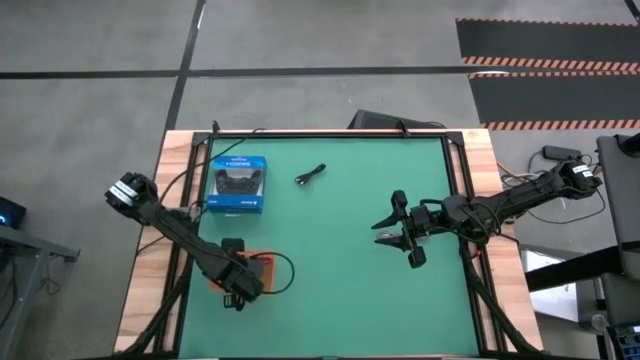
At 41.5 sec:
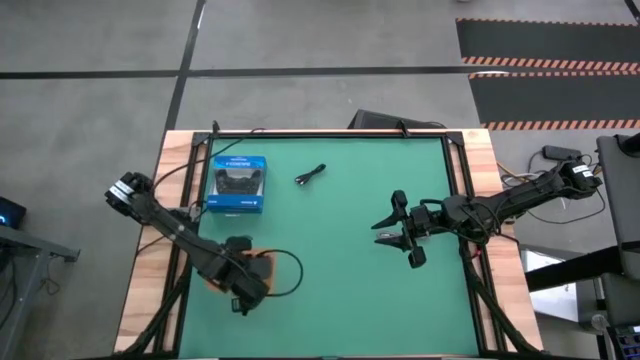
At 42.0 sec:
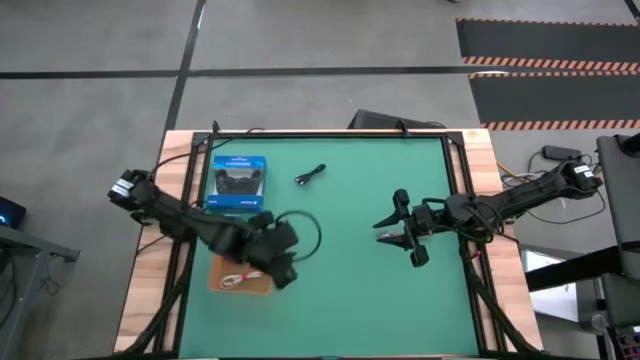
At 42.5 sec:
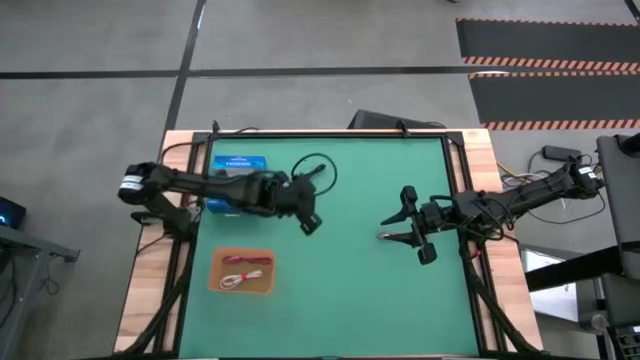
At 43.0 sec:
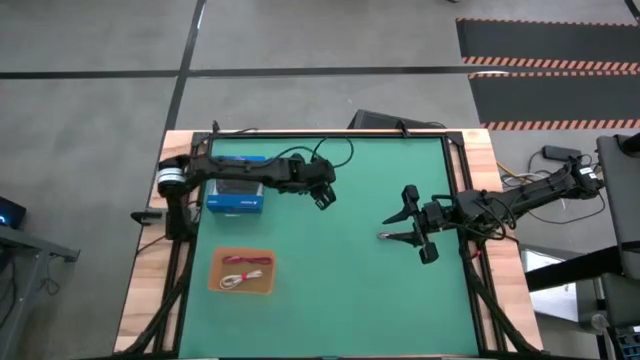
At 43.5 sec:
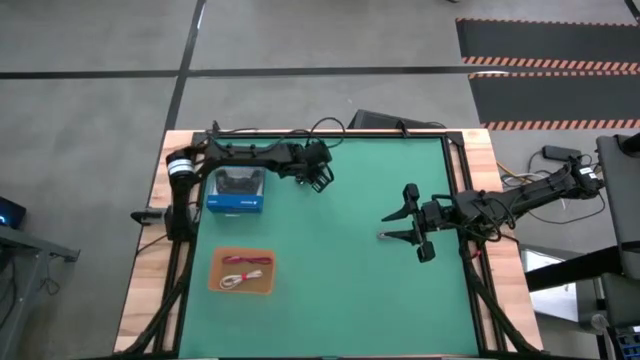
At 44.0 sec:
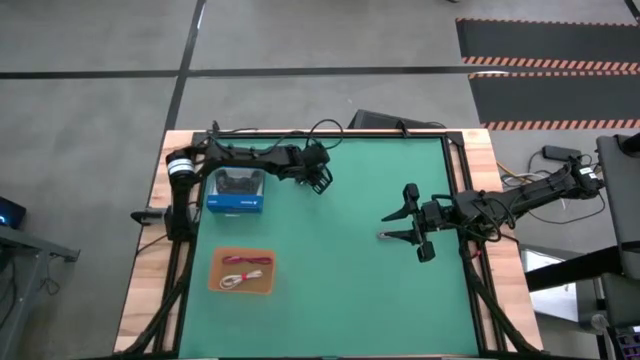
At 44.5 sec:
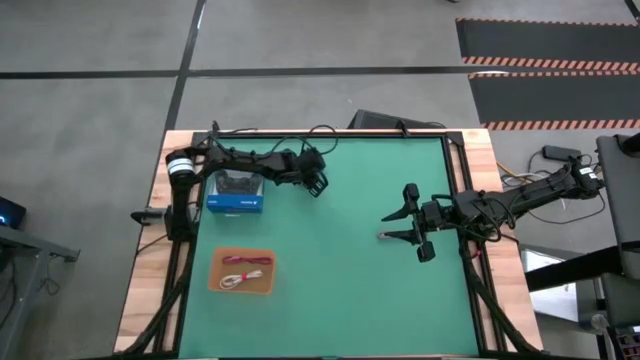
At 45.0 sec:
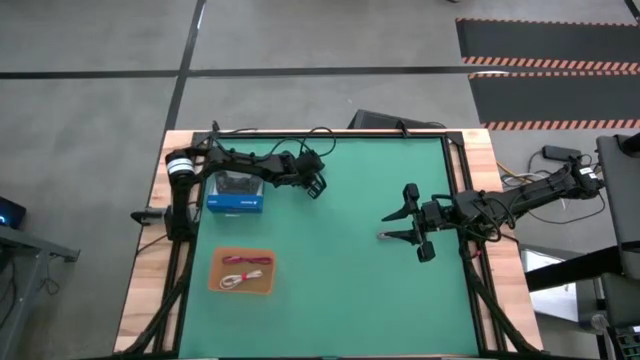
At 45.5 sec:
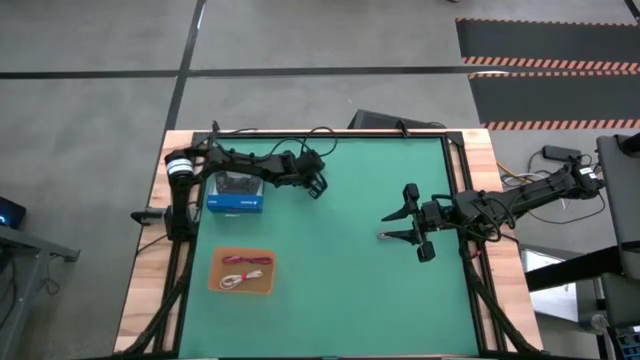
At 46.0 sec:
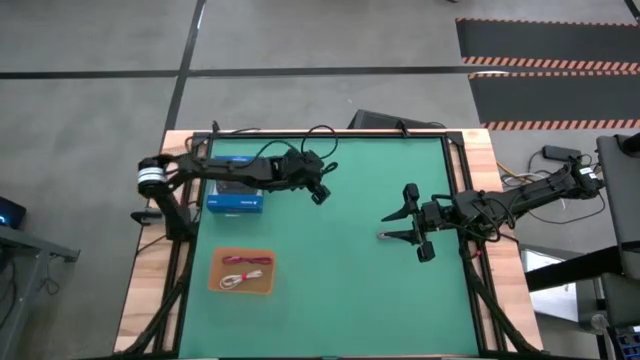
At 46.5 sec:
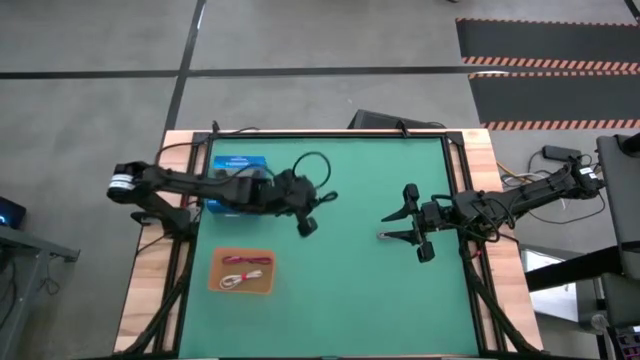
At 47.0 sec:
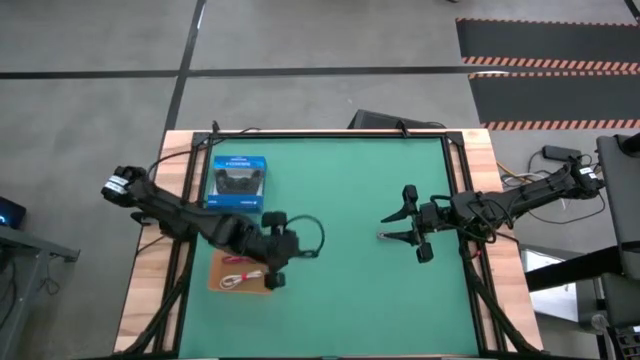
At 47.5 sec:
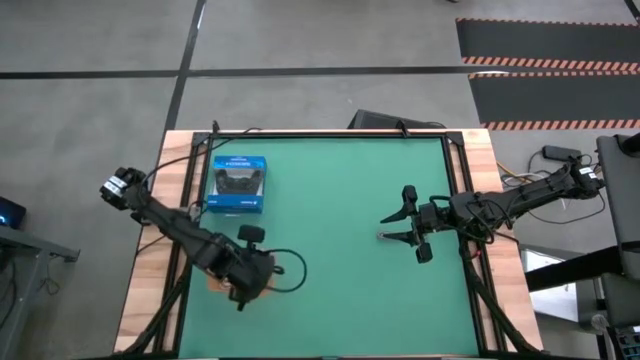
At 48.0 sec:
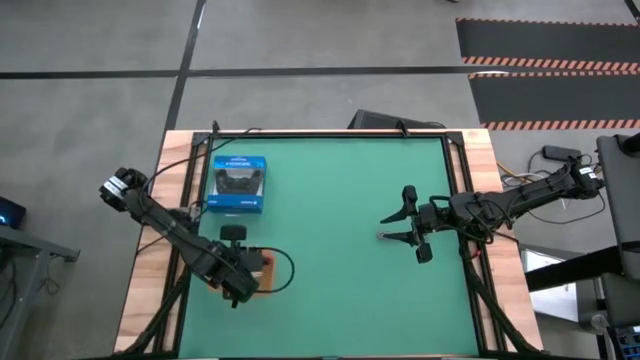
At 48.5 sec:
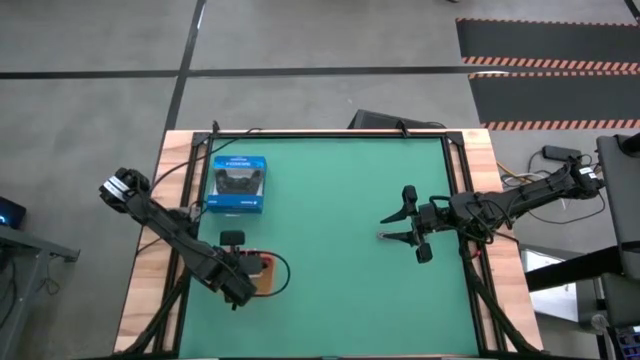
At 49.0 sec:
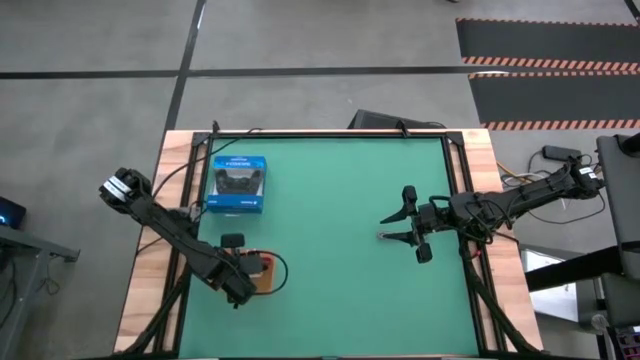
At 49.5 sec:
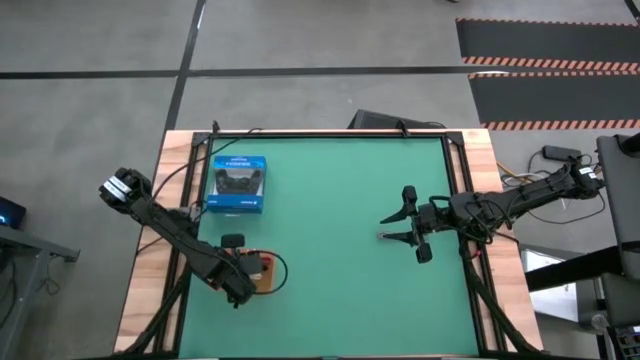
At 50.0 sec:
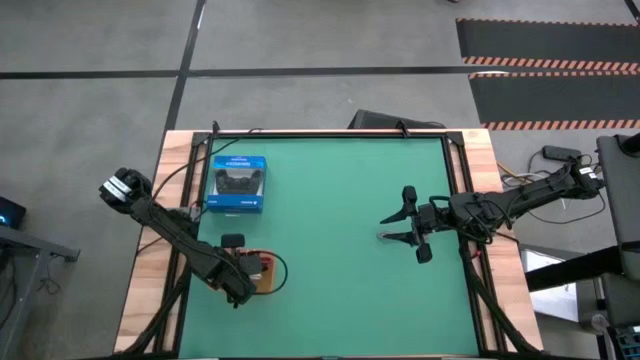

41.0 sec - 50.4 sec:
Task: Pick and place USB-C Cables
Put the black charger cable into the orange bin

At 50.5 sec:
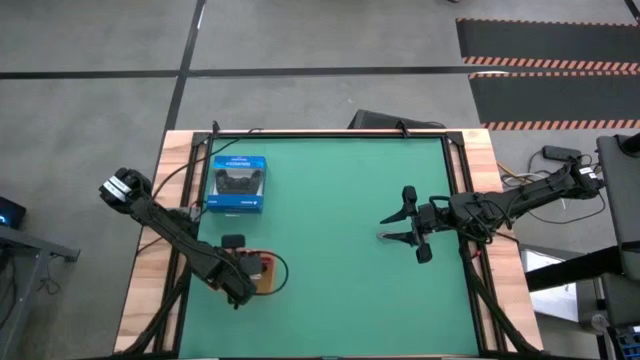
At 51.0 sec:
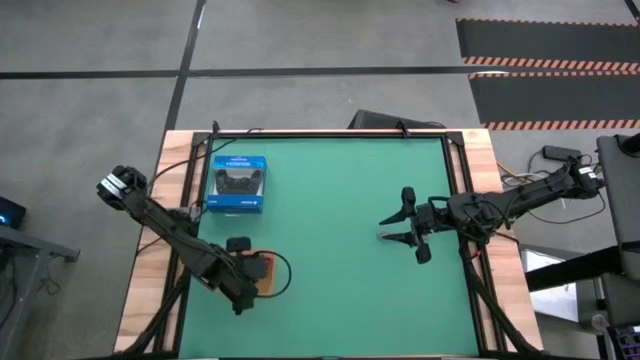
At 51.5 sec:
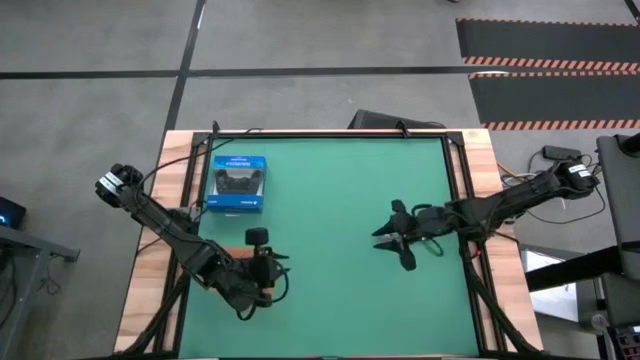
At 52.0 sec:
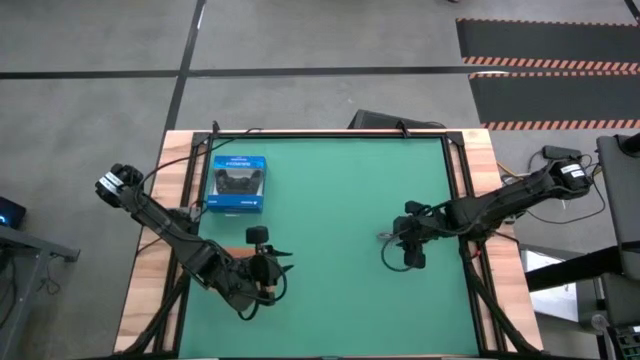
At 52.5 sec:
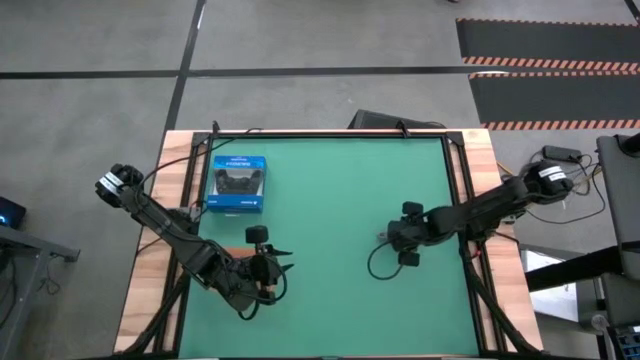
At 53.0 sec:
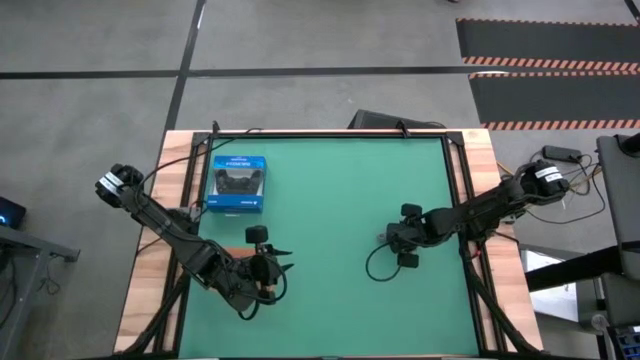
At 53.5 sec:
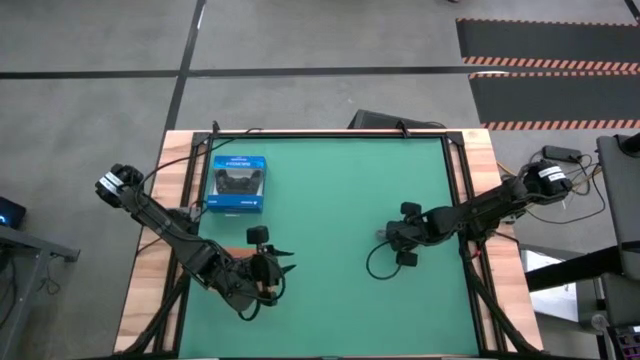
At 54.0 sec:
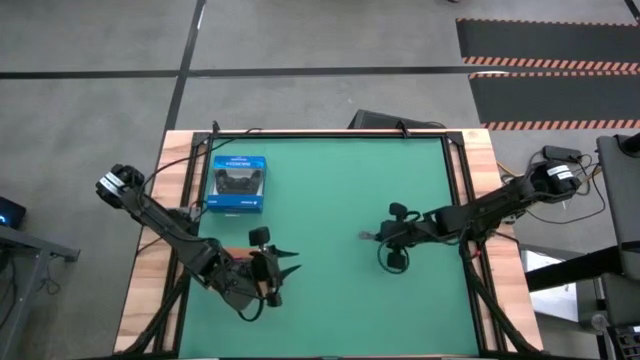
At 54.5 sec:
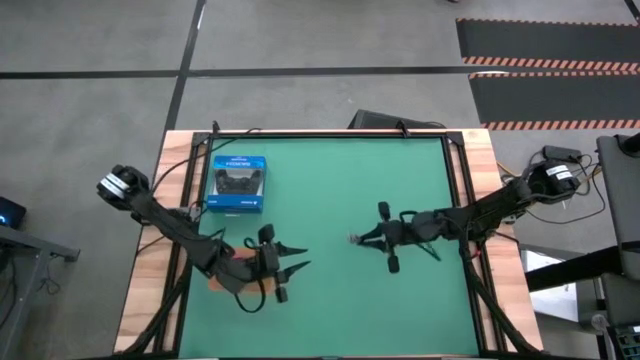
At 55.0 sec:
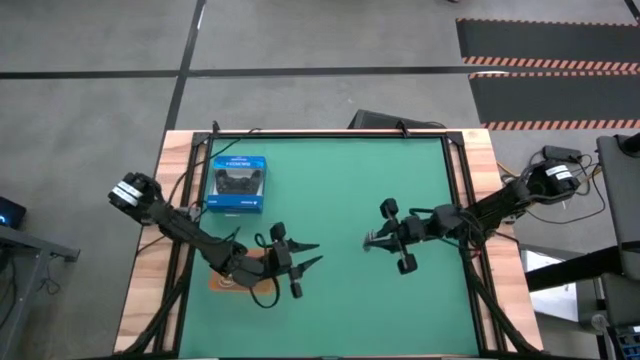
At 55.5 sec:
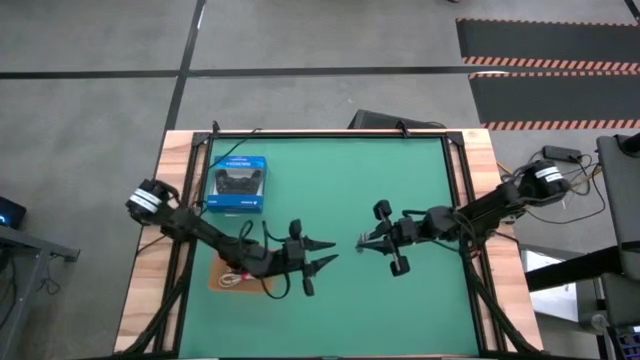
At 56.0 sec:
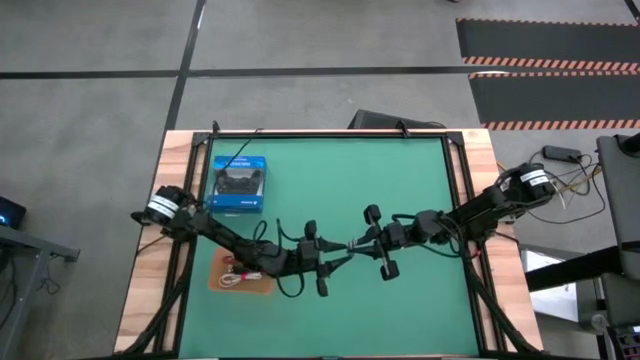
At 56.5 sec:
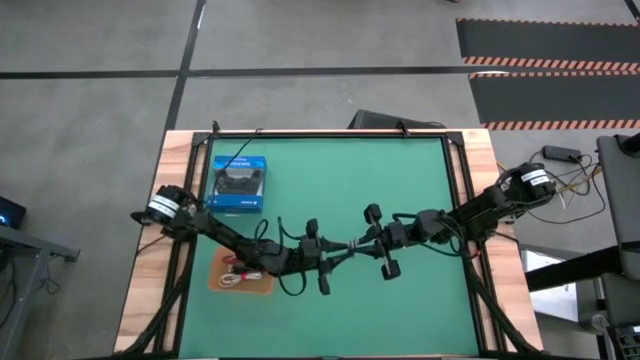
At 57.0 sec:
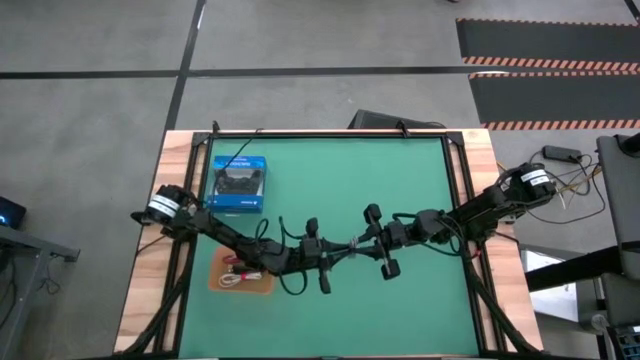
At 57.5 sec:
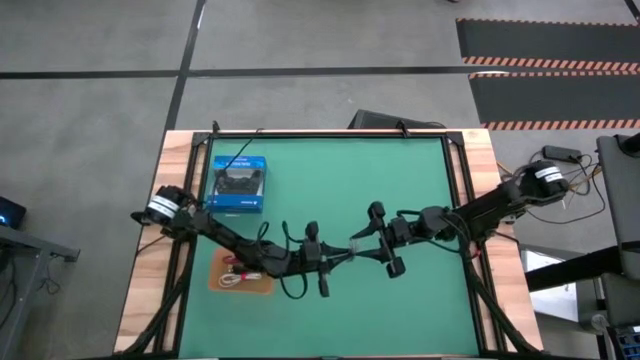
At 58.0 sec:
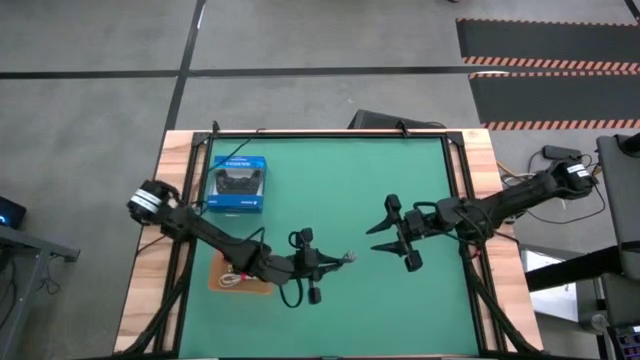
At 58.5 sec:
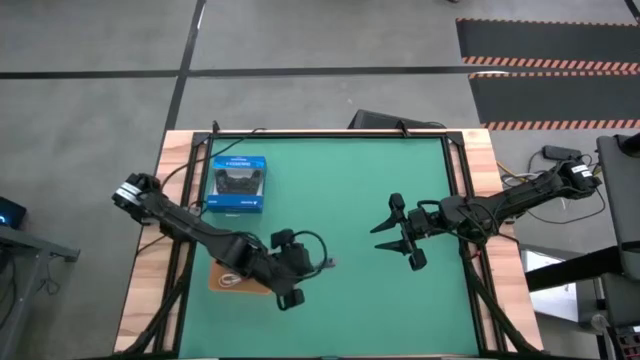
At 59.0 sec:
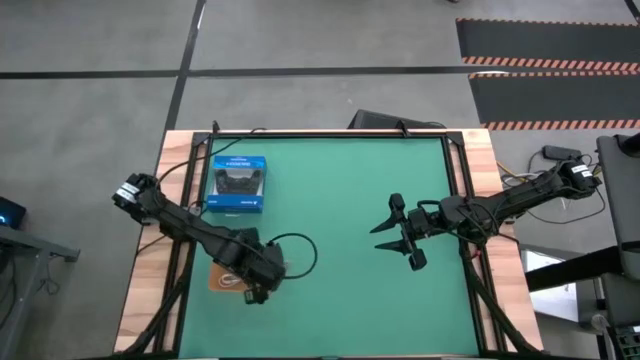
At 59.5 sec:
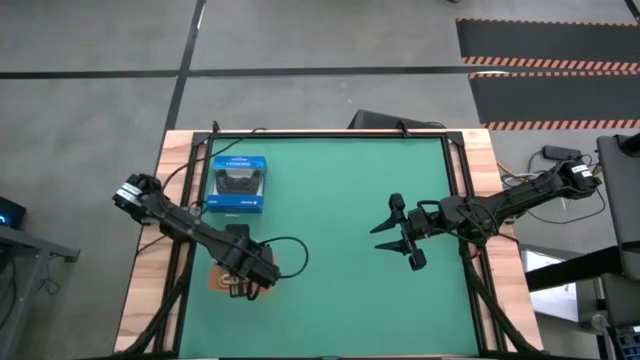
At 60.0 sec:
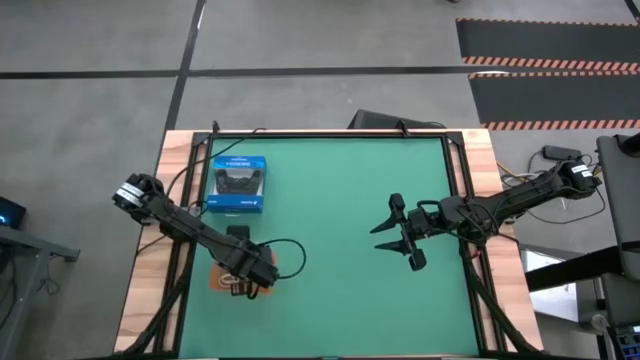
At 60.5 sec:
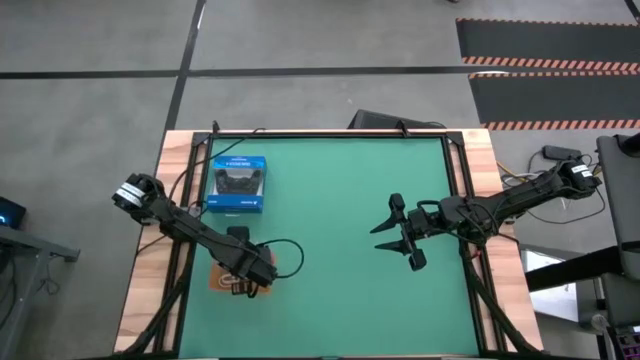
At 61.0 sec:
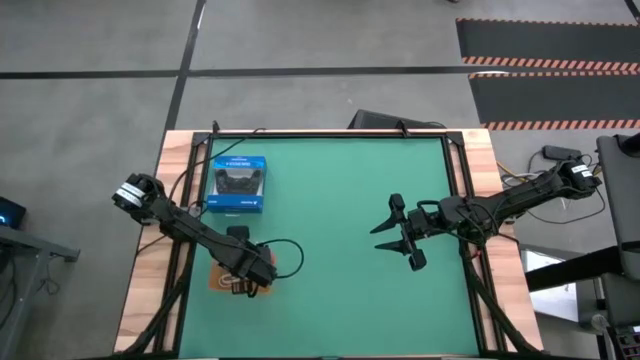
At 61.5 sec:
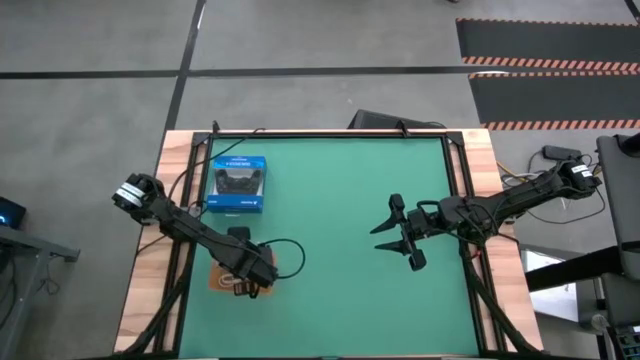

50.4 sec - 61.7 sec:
Put the black white charger cable into the orange bin

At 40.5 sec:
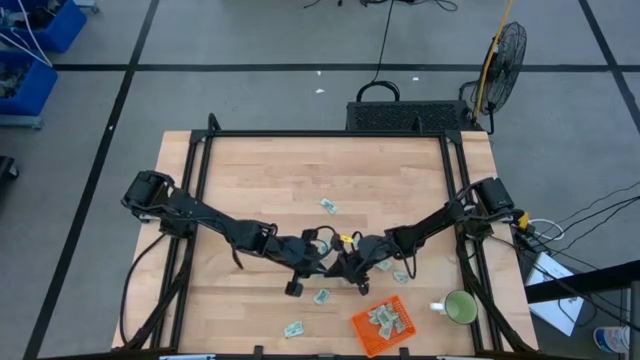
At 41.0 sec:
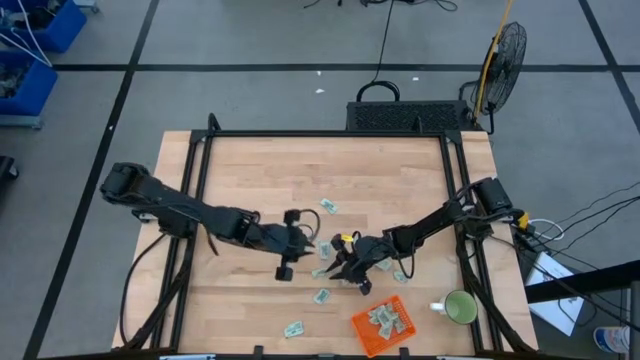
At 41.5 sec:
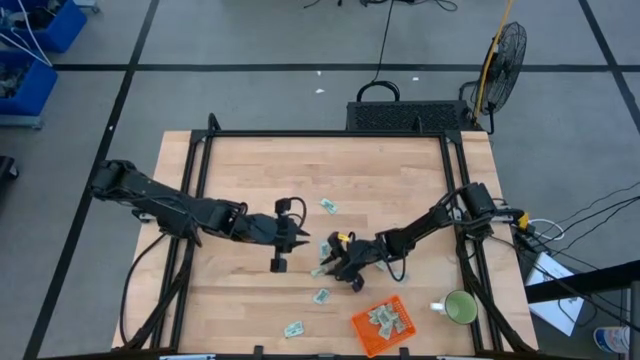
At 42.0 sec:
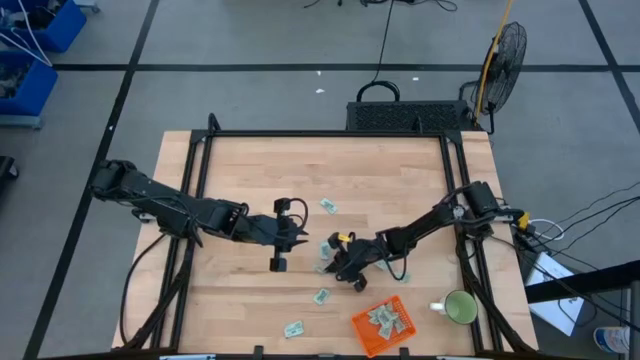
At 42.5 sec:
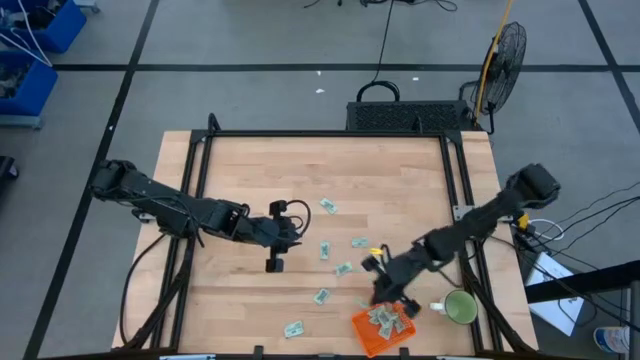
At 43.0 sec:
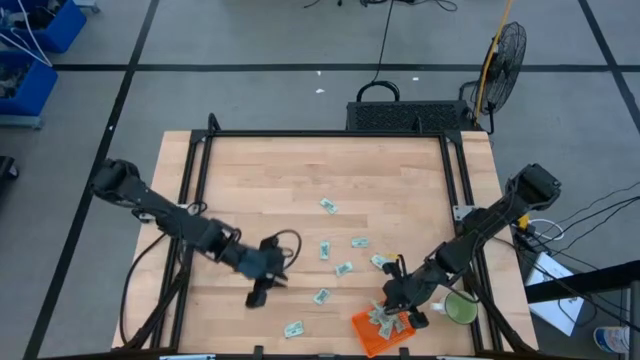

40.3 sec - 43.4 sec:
Task: Pick and place Stevia / Truvia into bins
Put the stevia packet into the orange bin
